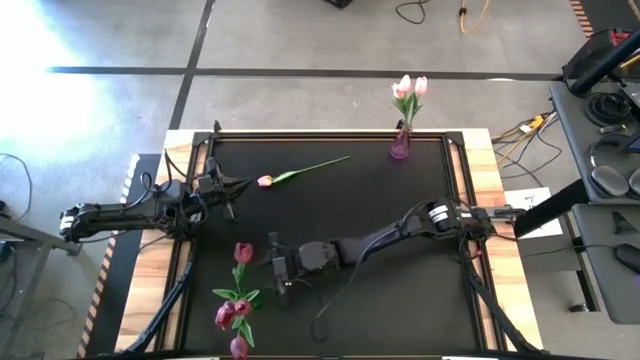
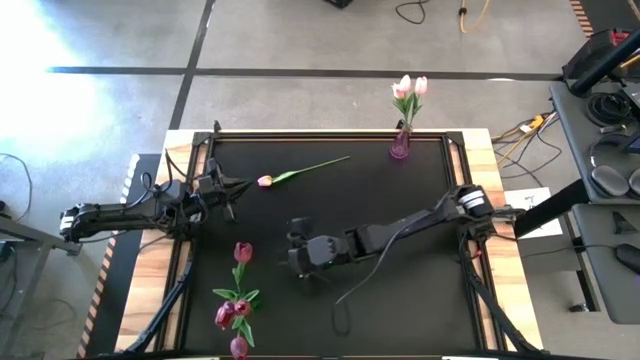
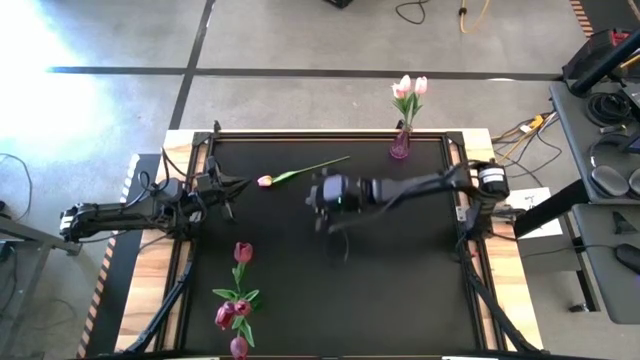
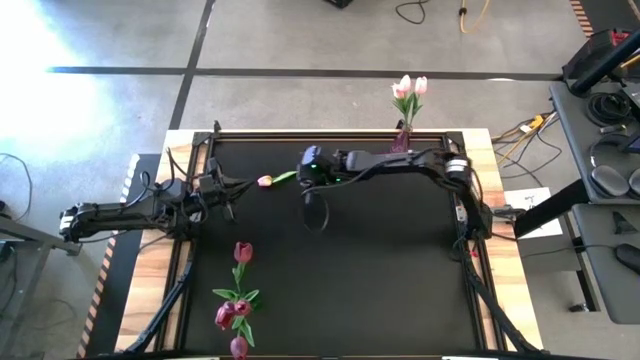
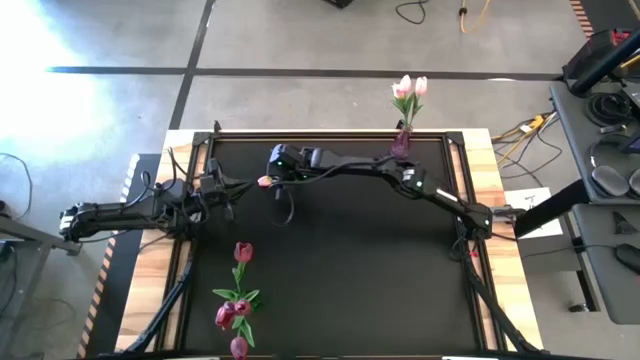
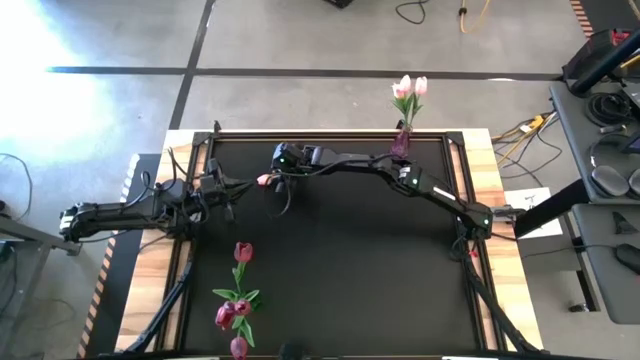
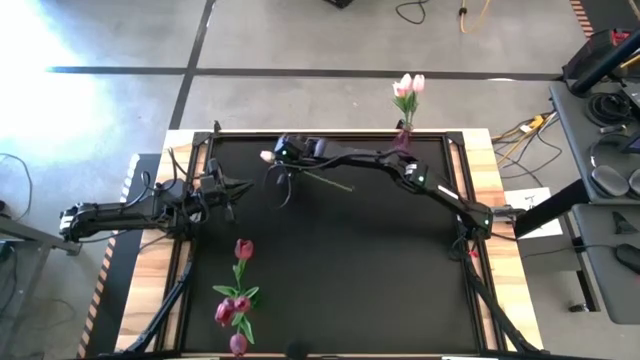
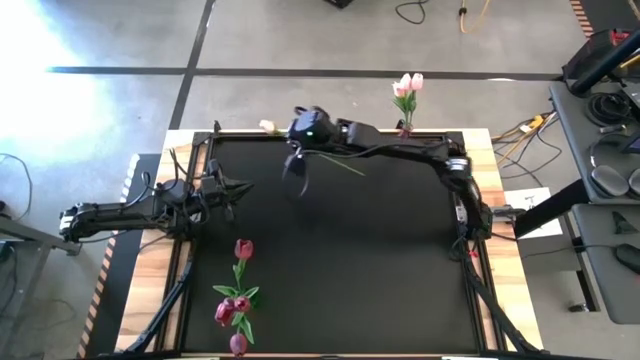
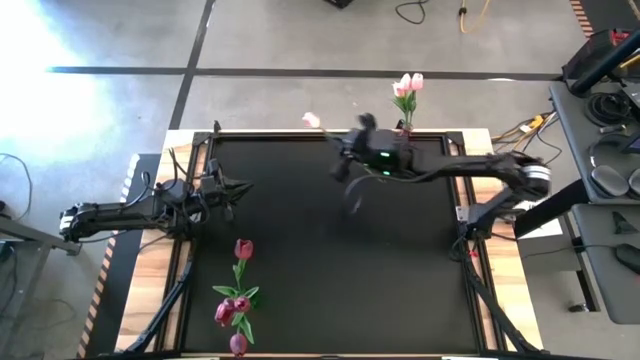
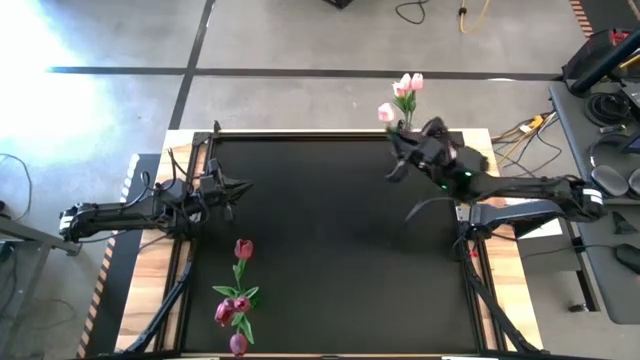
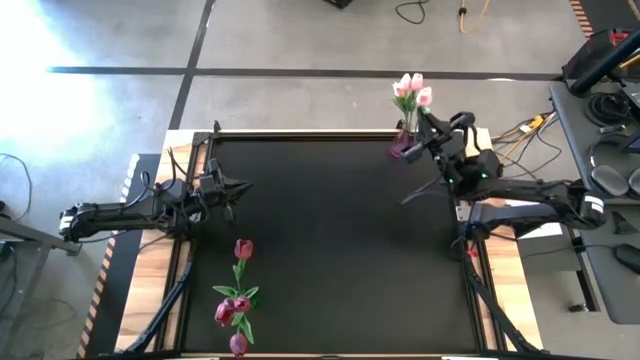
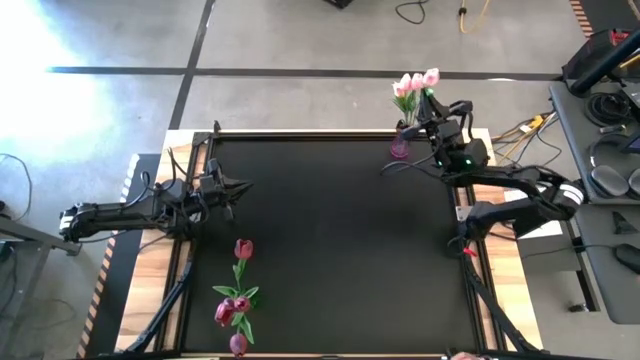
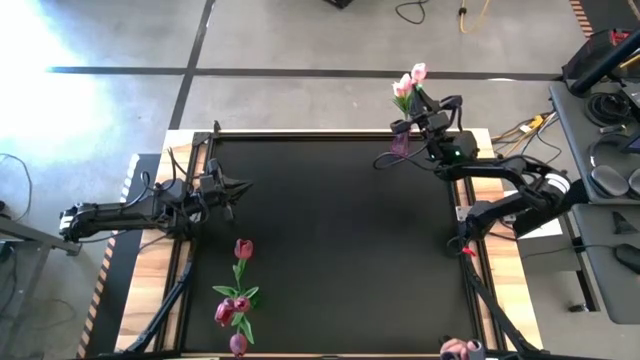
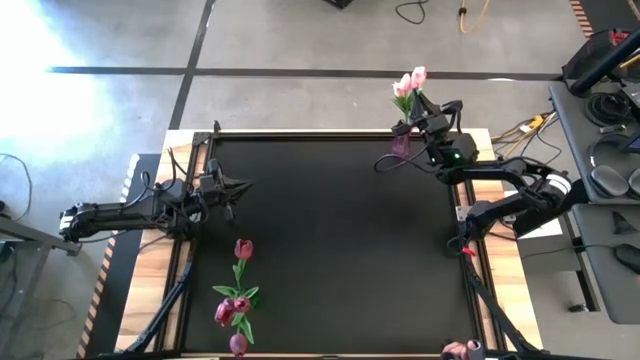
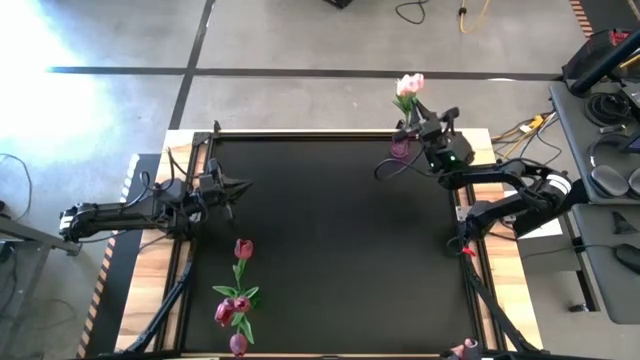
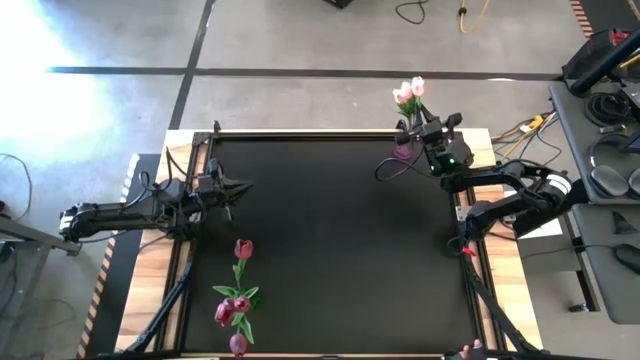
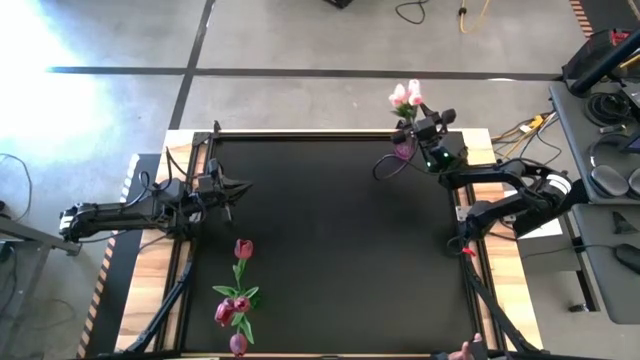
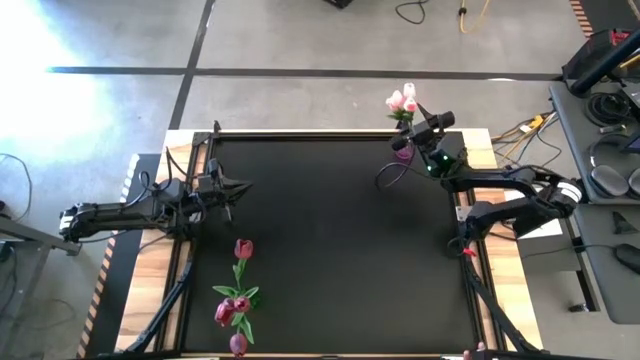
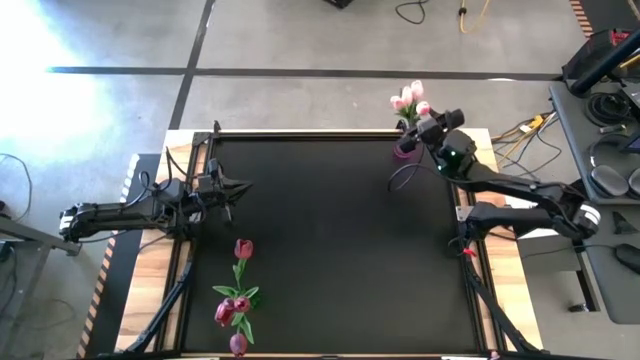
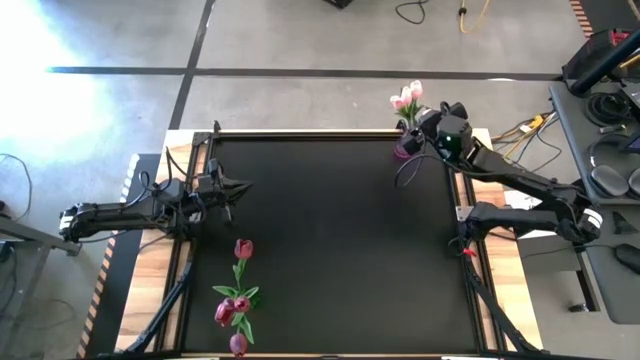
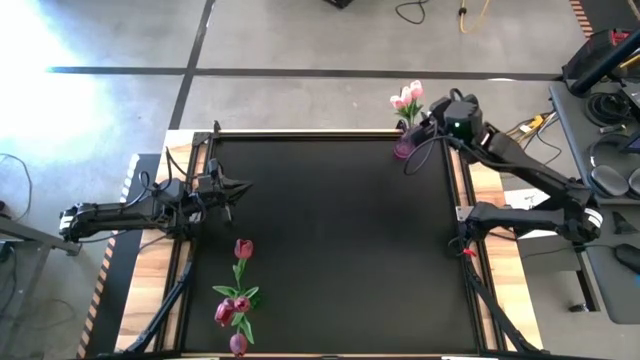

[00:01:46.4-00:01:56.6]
Task: Sort flowers into vase by color
Put the pink flower into the violet vase

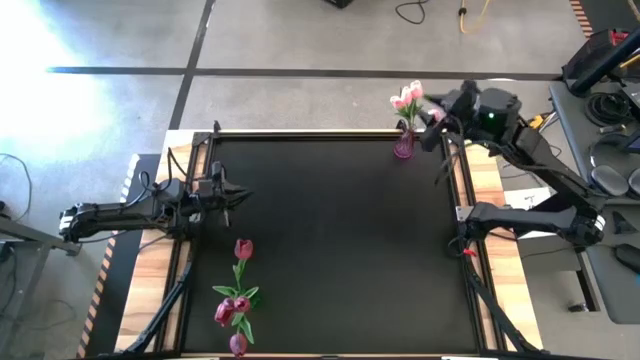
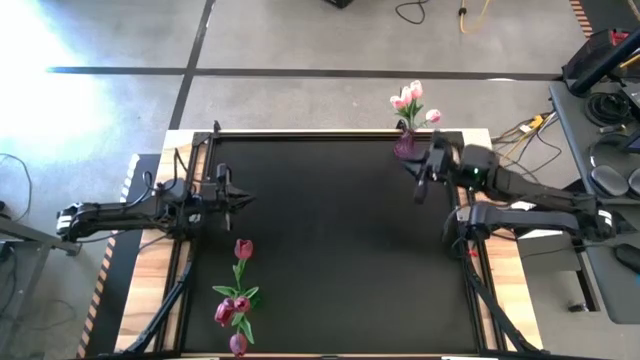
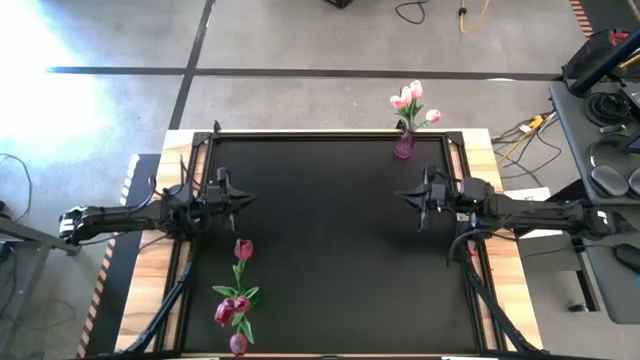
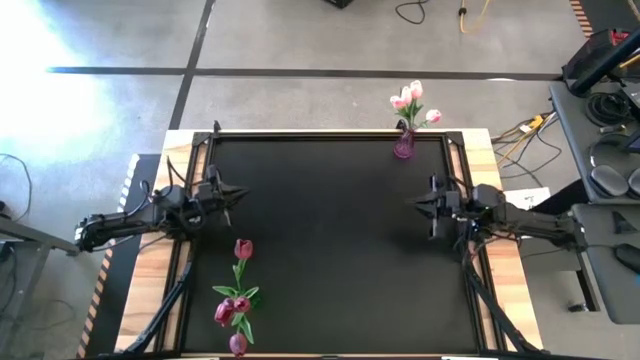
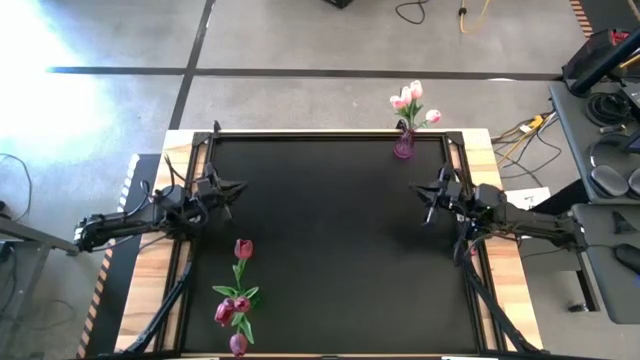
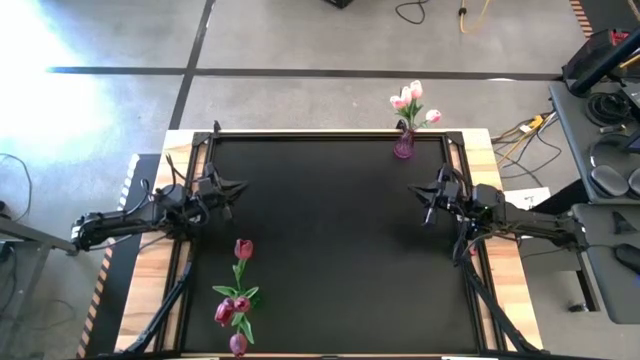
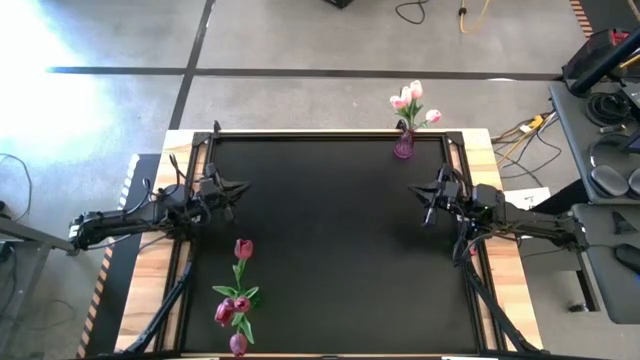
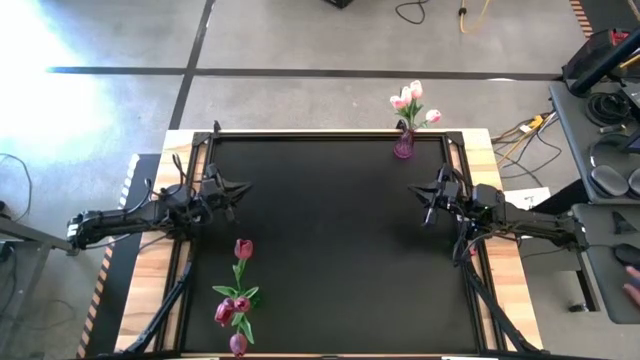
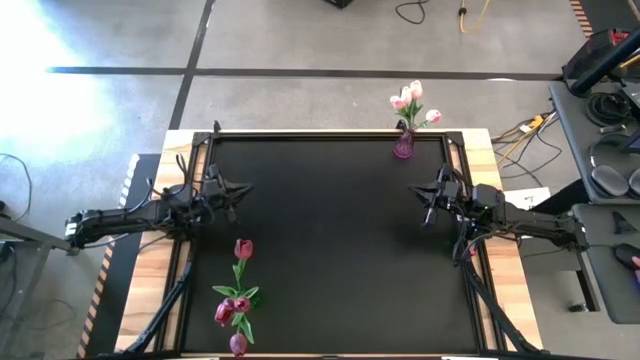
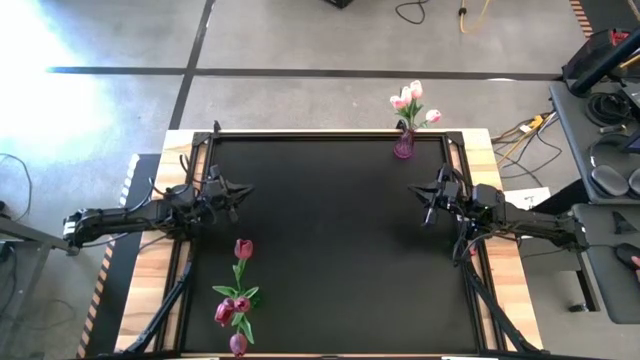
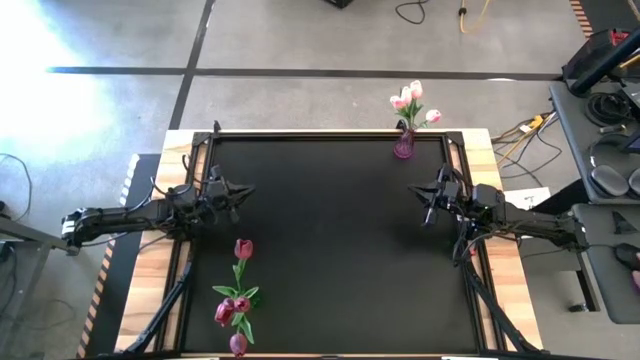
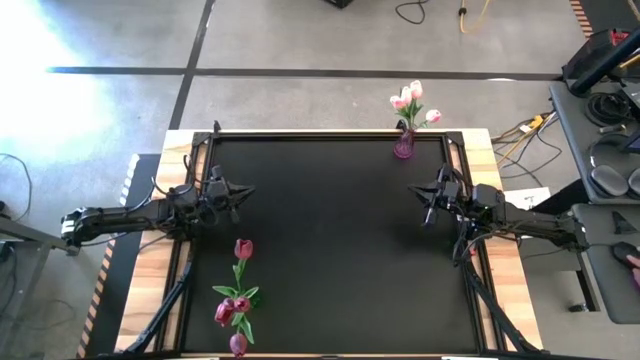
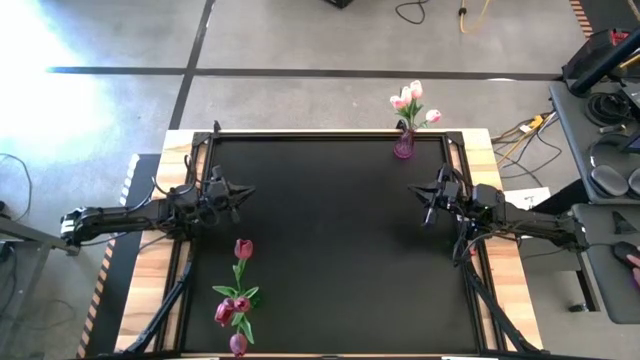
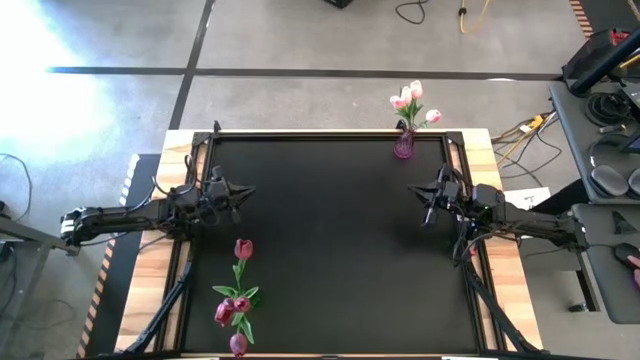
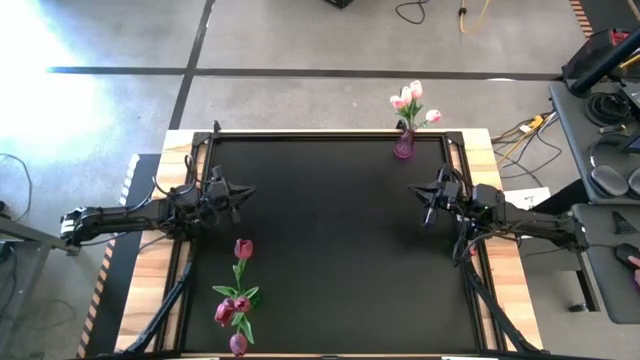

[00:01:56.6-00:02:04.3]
Return to Home Position

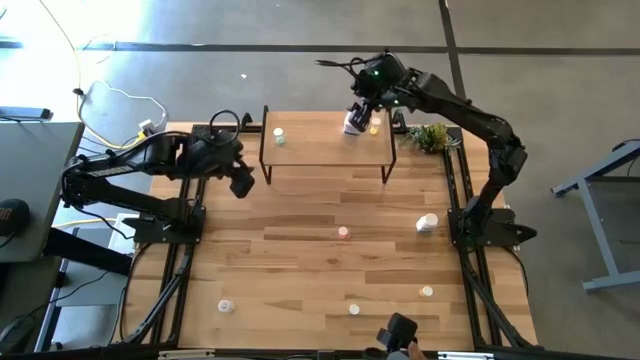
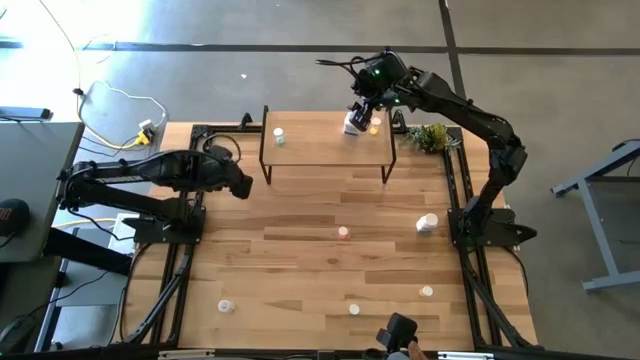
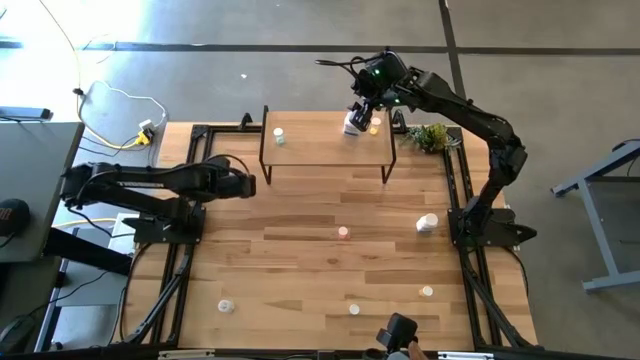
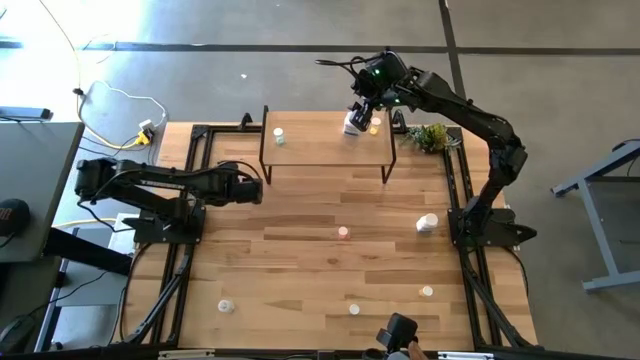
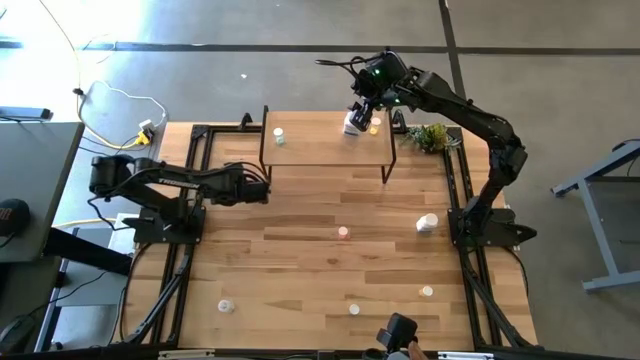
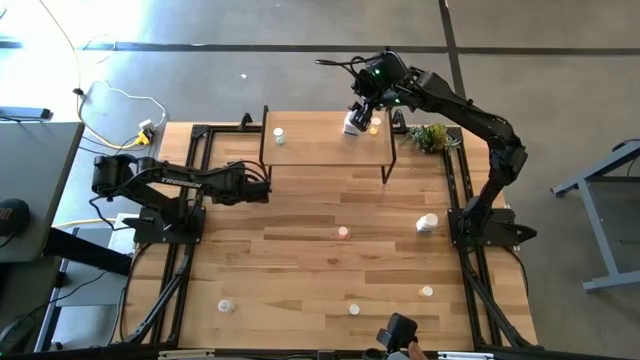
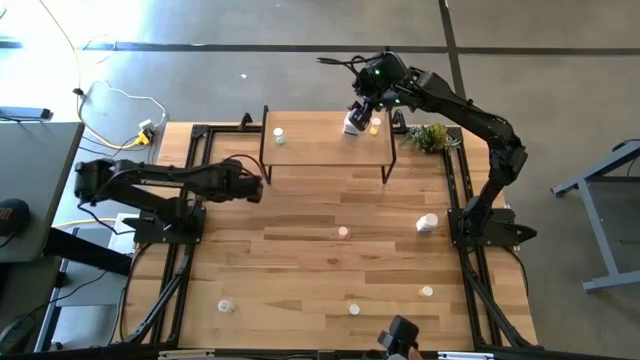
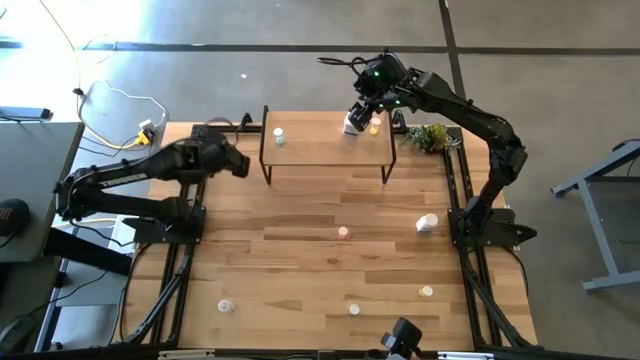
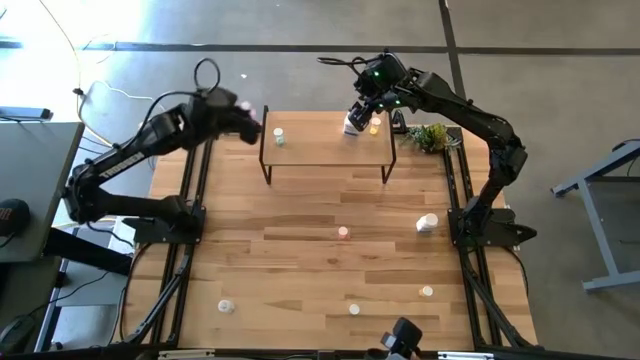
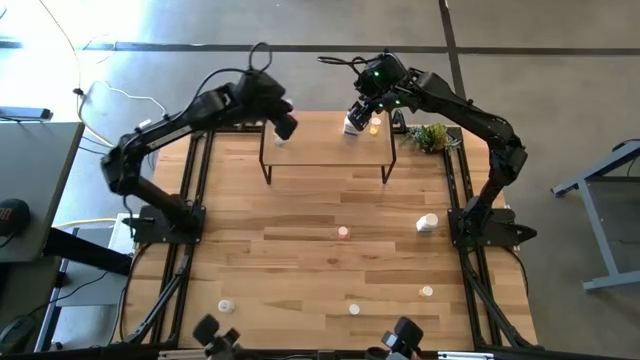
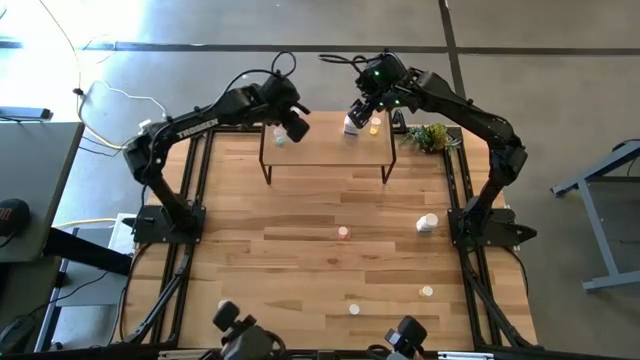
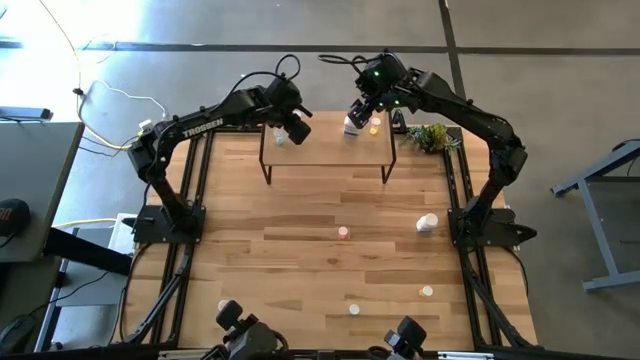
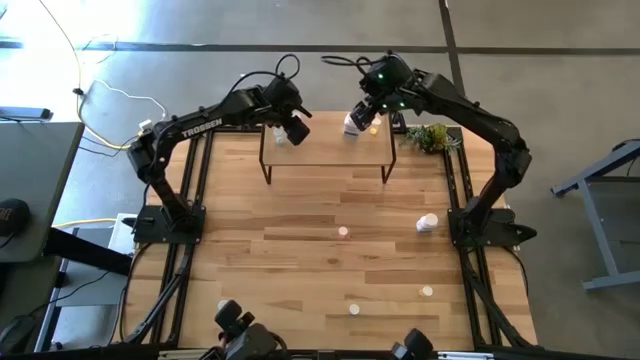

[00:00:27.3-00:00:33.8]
Task: Pick and place medicine bottles onto shelf by color
Put the violet pill bottle on the shelf
